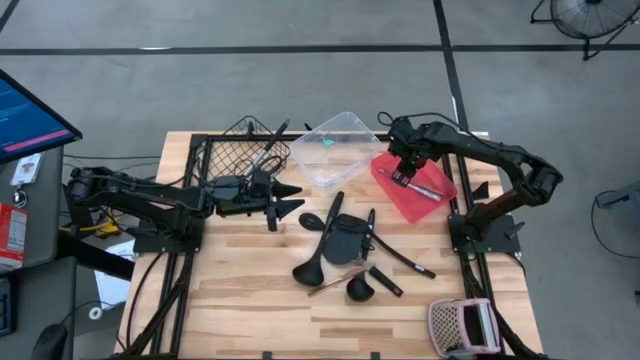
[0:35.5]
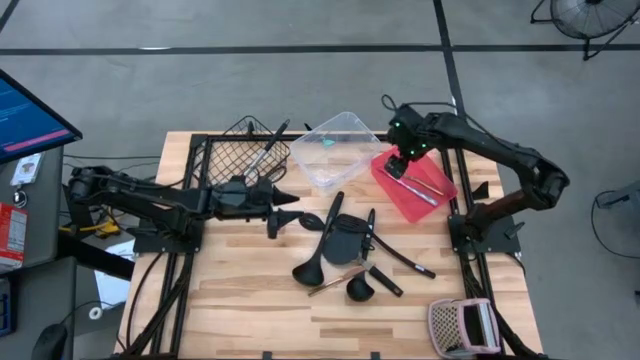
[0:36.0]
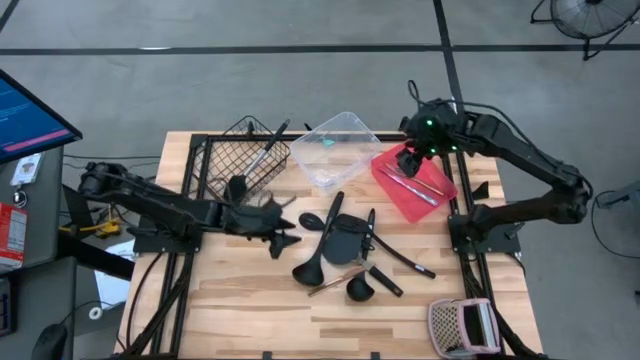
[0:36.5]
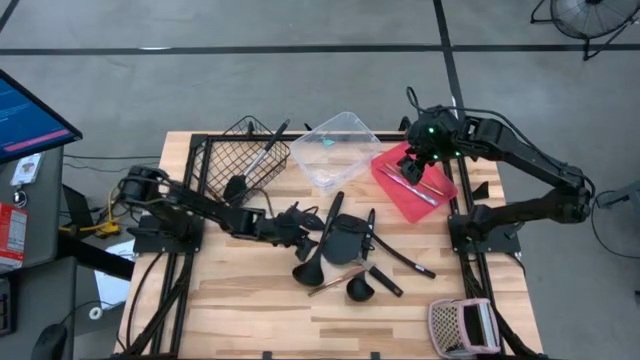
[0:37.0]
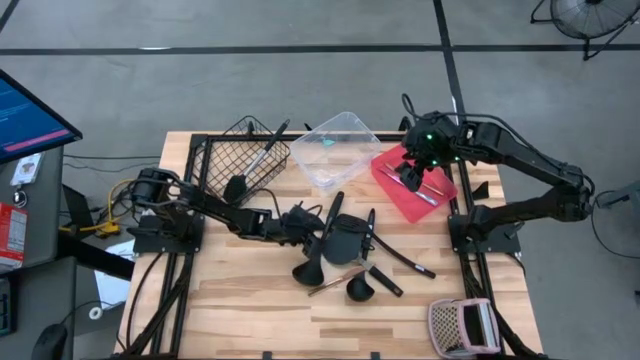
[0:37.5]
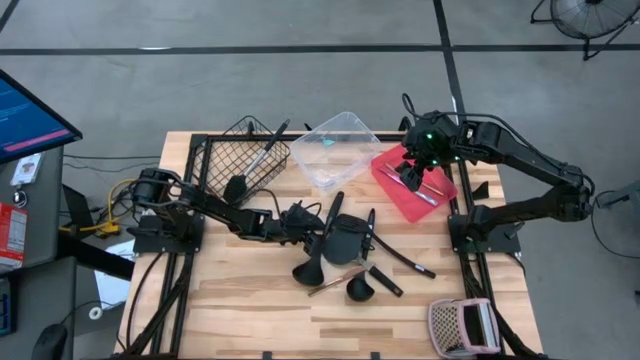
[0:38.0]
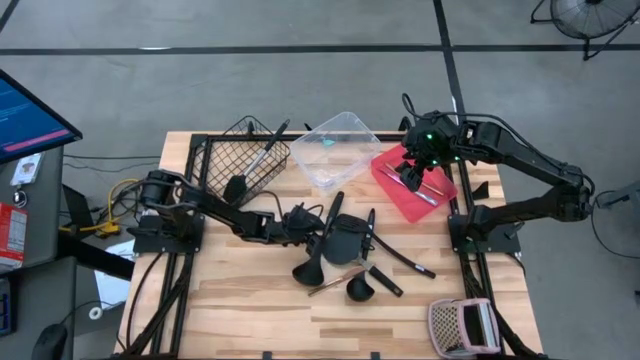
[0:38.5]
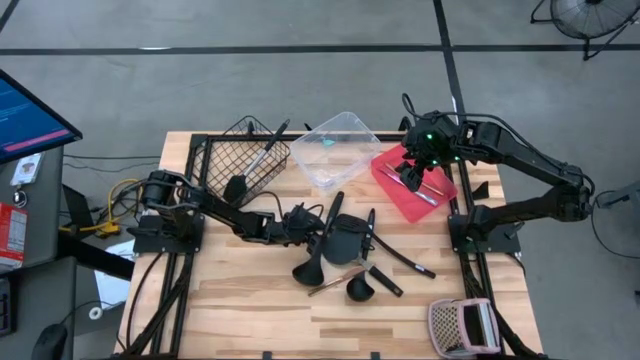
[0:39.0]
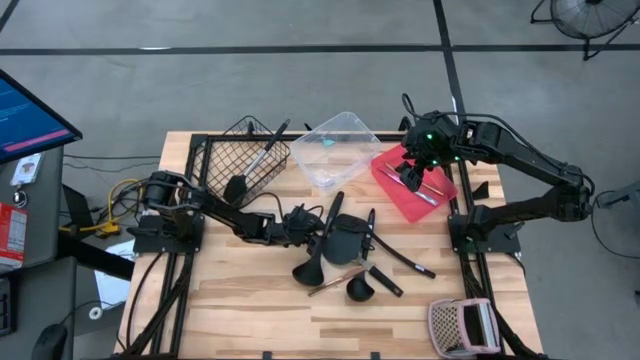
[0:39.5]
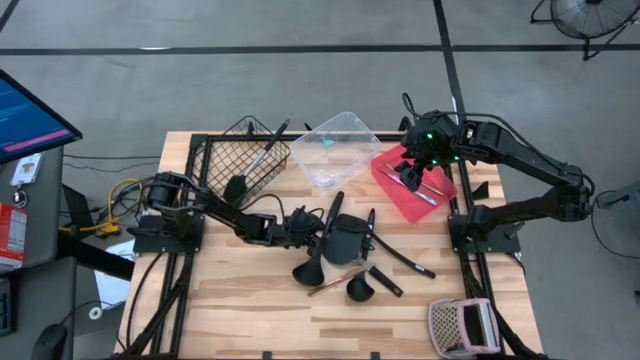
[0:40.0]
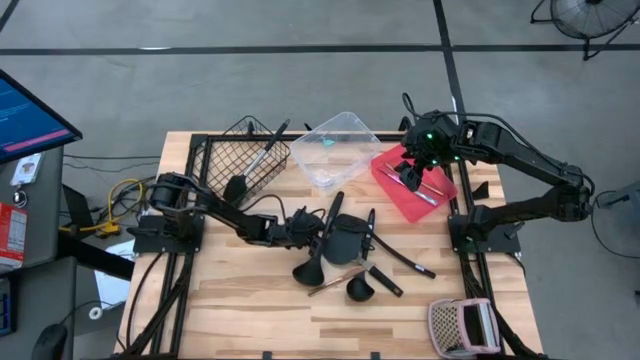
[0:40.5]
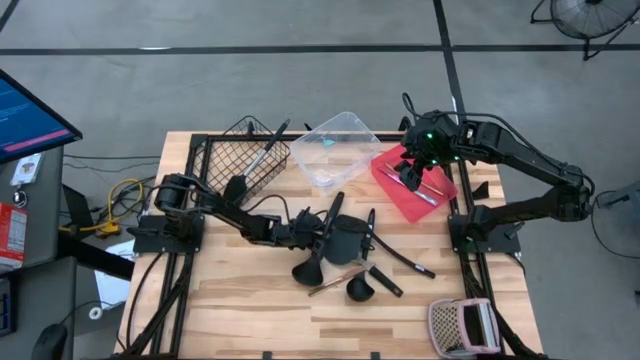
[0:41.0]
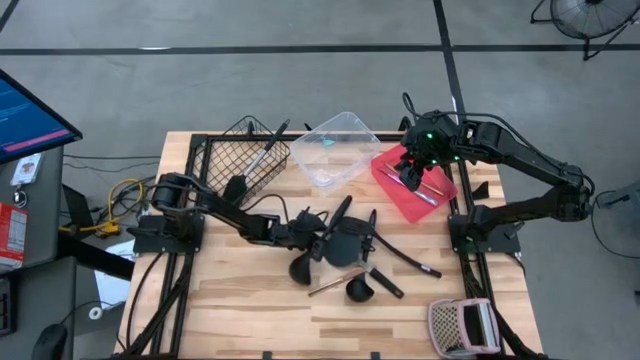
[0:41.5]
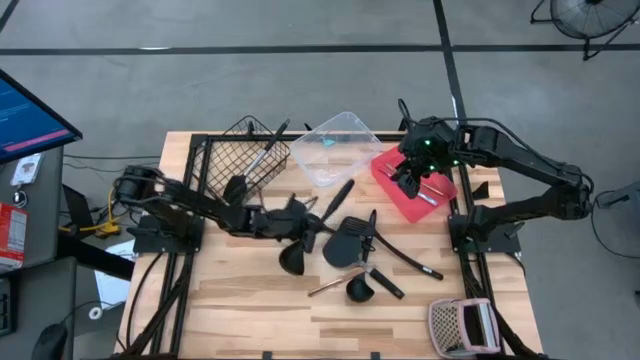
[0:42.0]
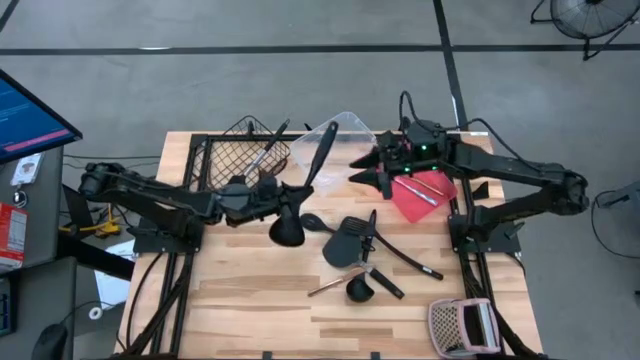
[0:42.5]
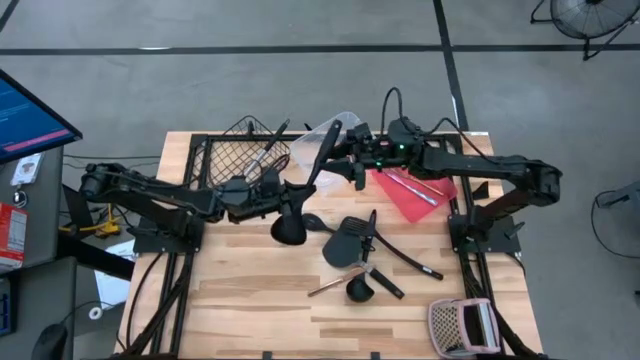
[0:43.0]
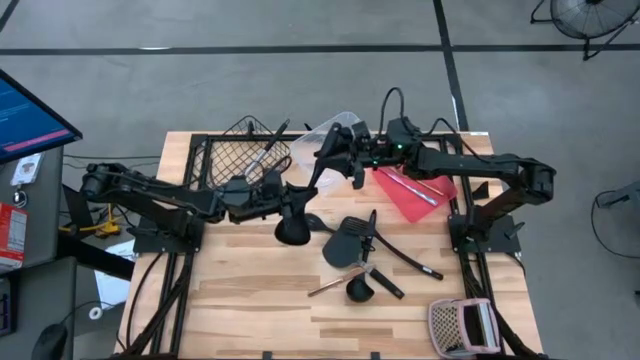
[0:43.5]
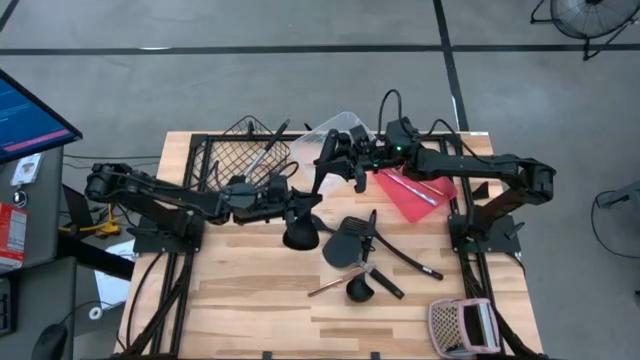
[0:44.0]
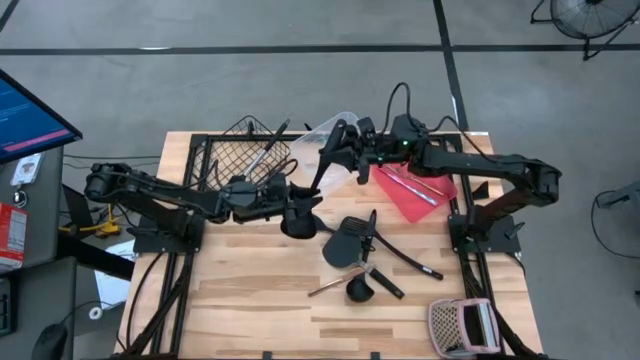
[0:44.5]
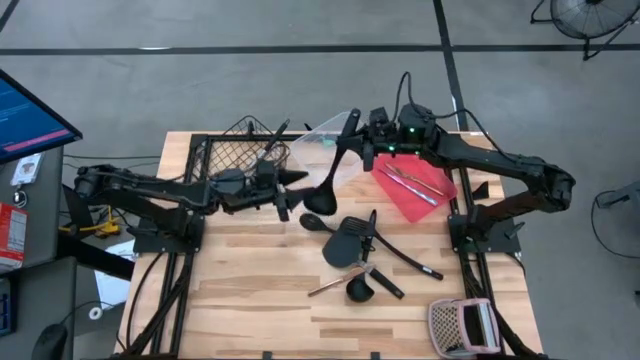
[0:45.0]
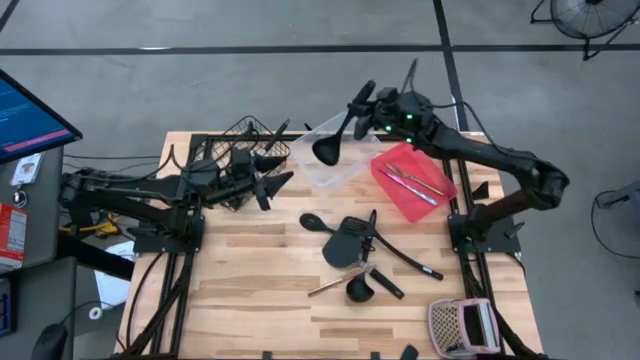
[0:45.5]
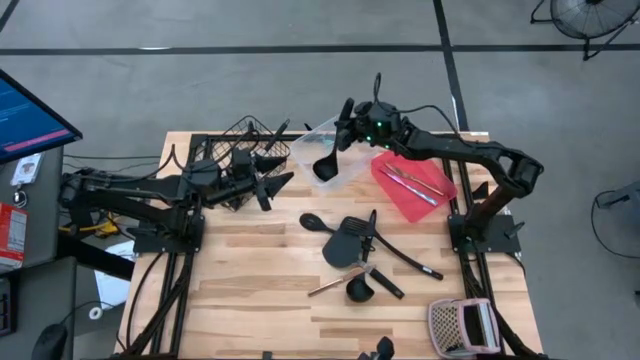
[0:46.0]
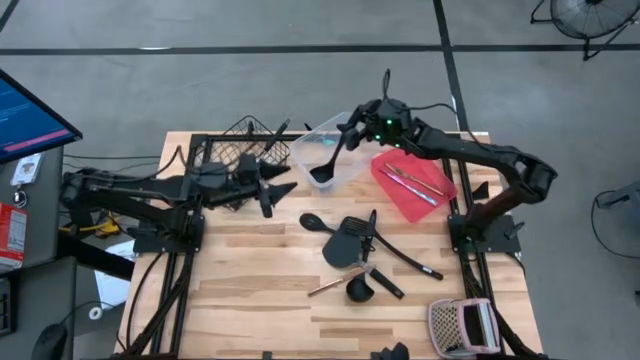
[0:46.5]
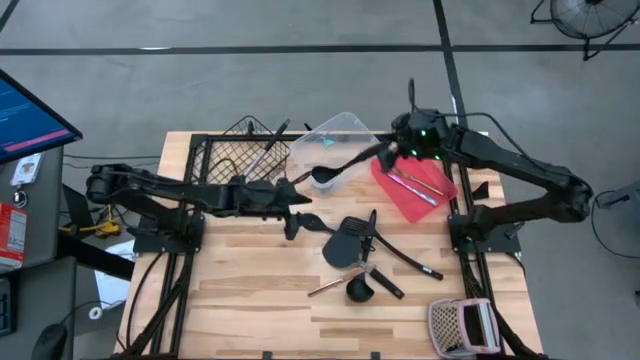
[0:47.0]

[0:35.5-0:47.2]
Task: Pick & Place Kitchen Items
Put the left ladle into the transparent bin

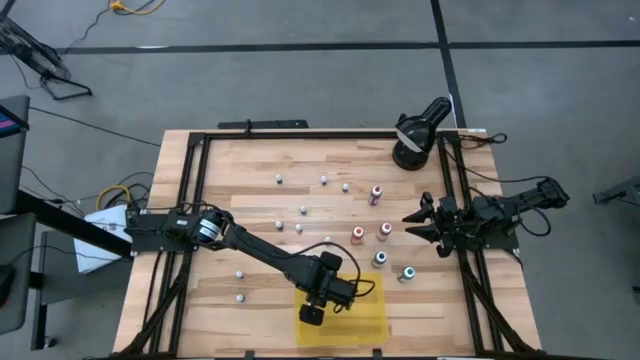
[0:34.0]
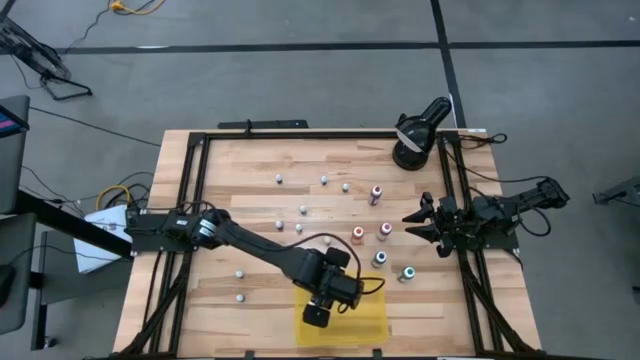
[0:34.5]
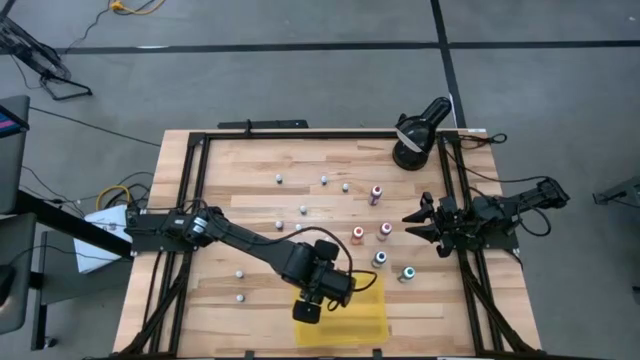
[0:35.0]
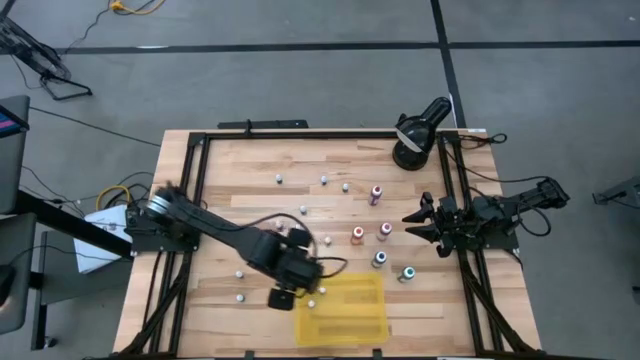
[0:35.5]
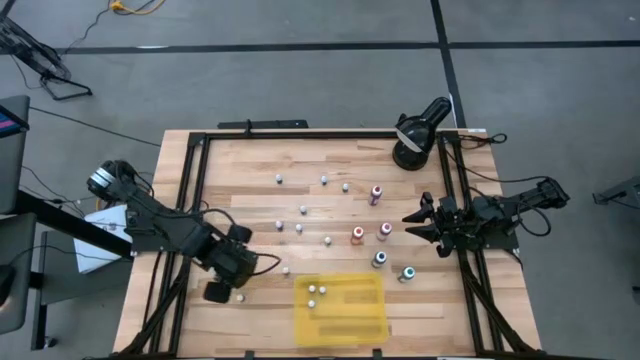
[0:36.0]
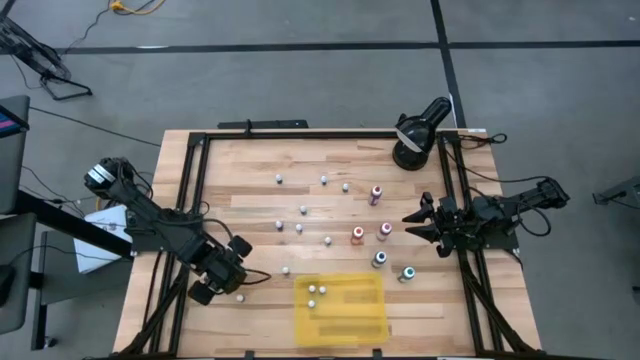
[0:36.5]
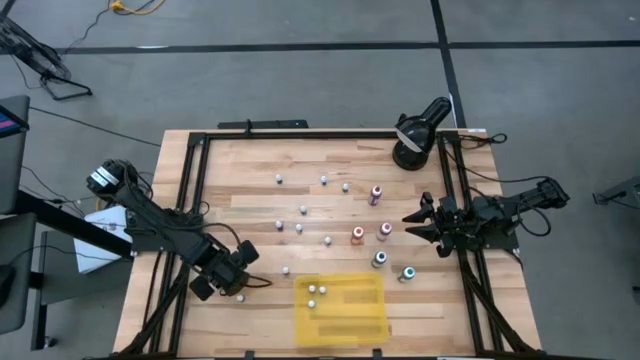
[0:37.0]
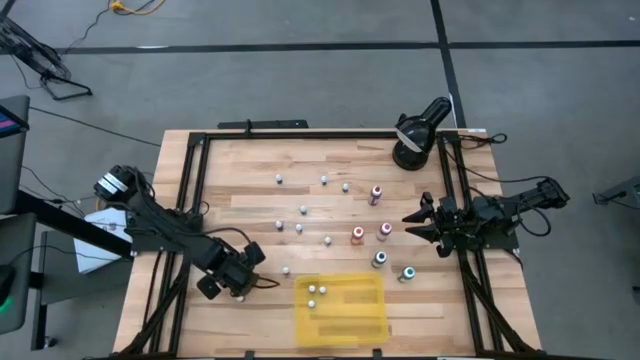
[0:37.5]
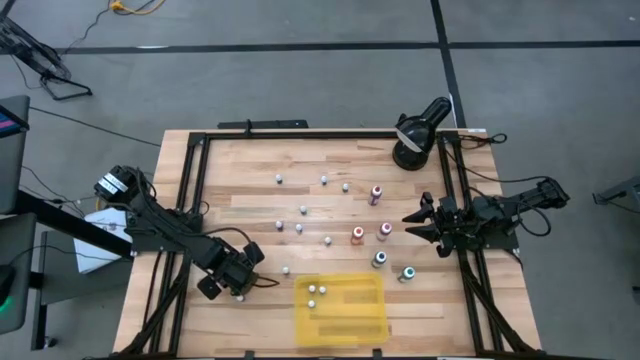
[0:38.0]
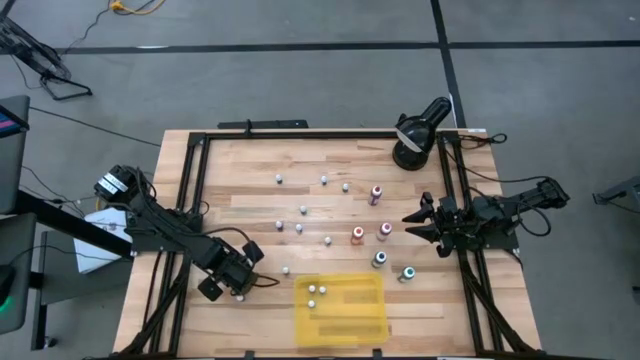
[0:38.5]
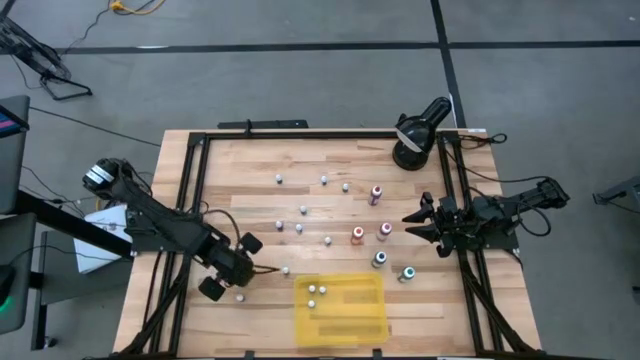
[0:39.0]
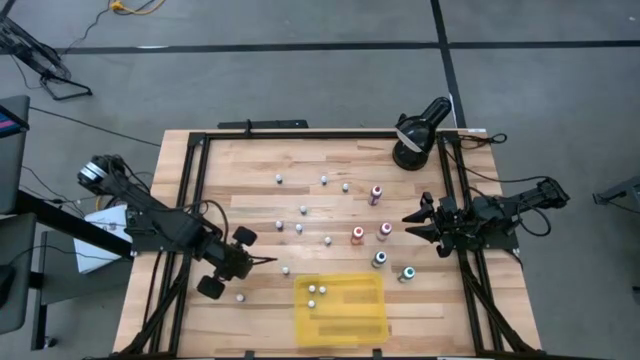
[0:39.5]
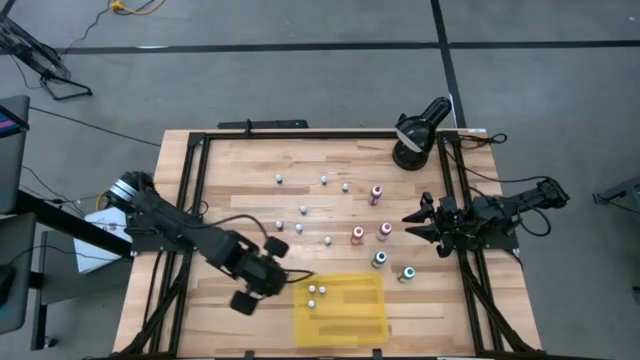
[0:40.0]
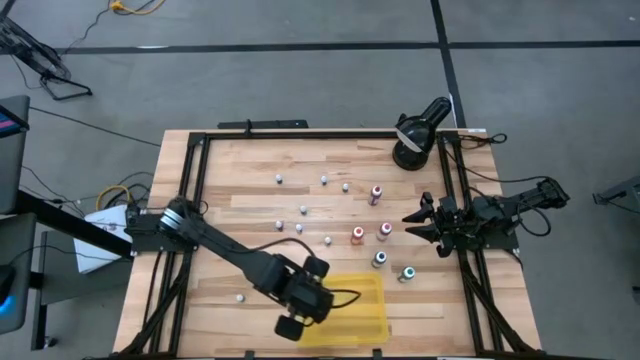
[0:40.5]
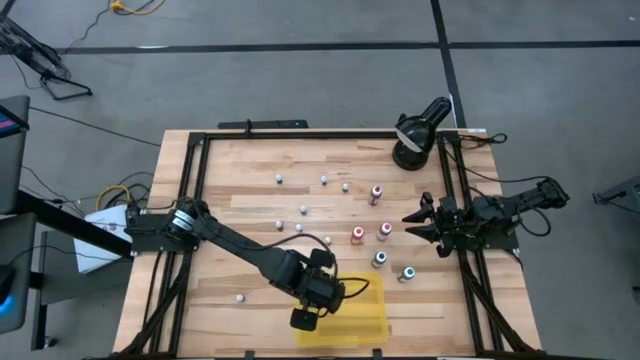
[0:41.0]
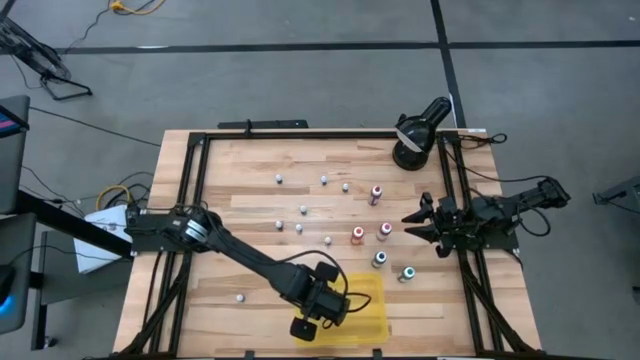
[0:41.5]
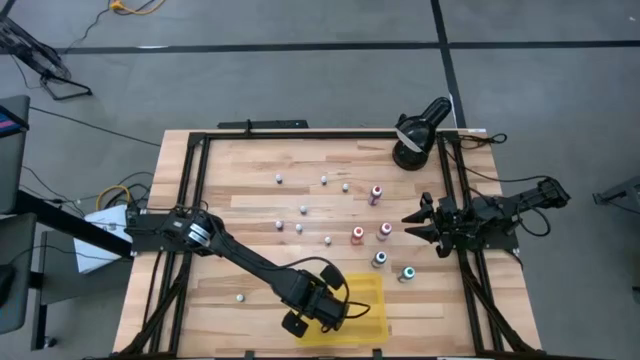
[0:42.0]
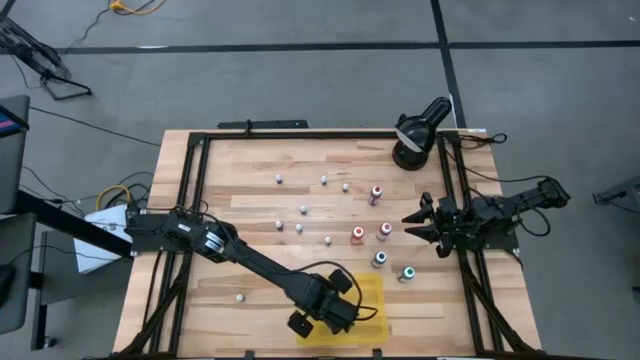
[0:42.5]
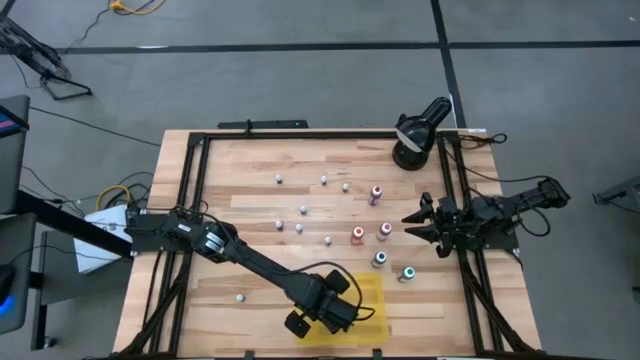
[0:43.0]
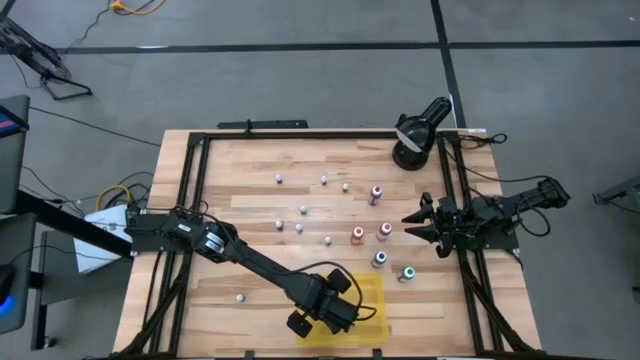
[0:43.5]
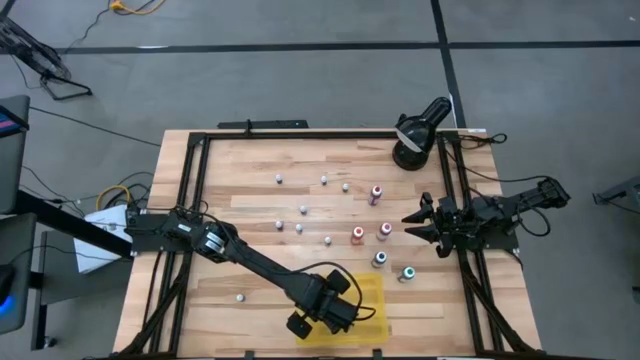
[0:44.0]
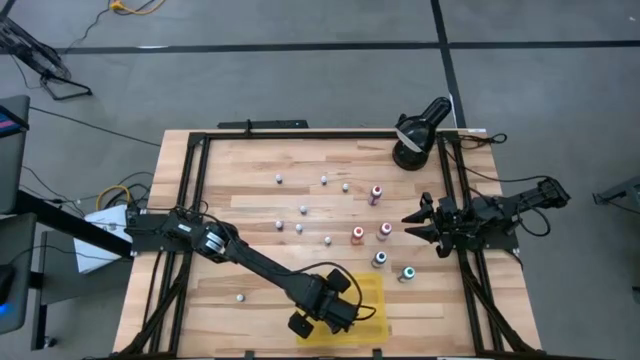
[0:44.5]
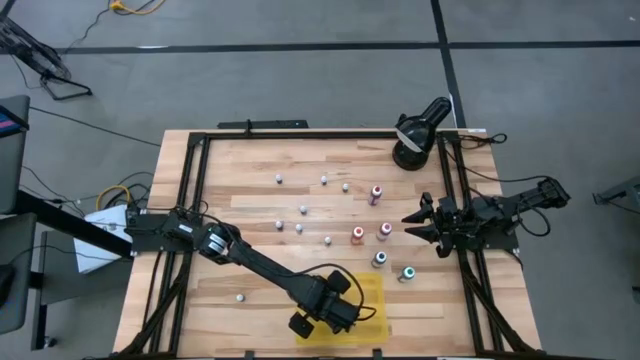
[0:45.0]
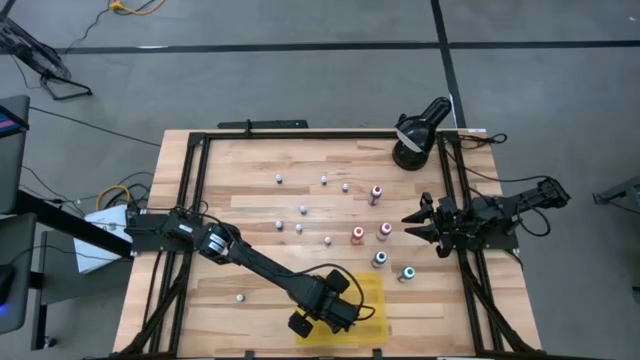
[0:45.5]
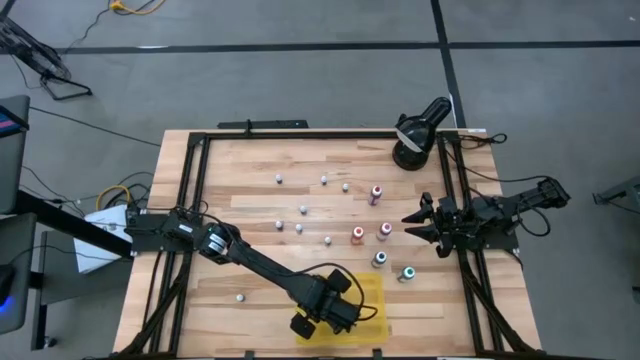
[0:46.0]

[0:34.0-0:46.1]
Task: Pick & Place food coloring
Put the small black food coloring bottle in the yellow bin
